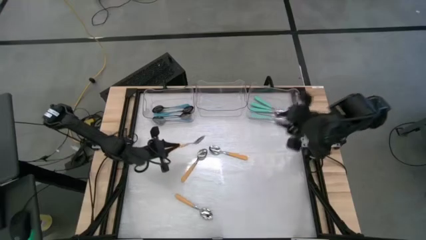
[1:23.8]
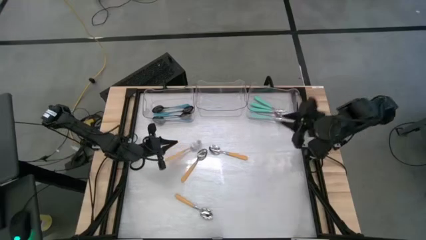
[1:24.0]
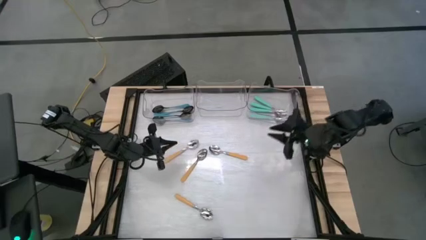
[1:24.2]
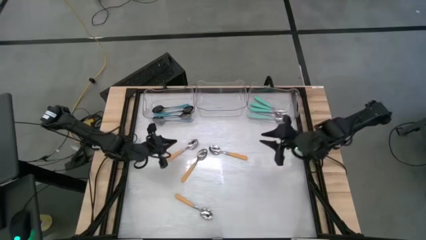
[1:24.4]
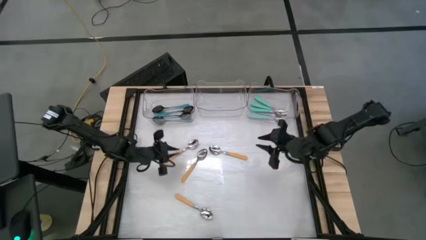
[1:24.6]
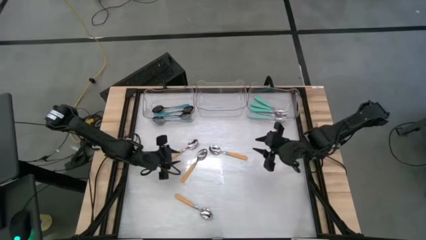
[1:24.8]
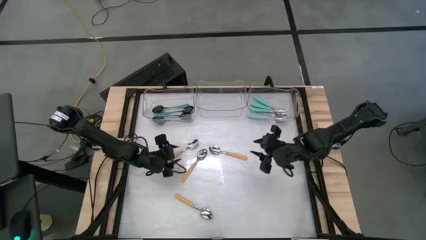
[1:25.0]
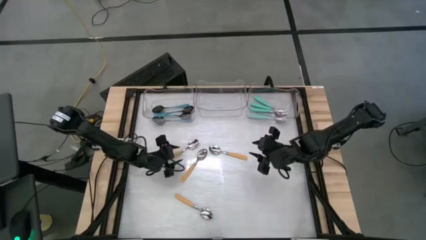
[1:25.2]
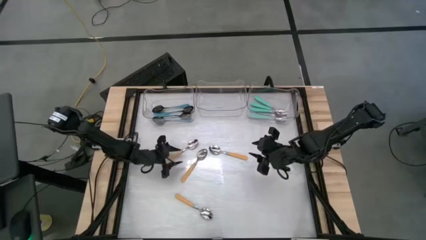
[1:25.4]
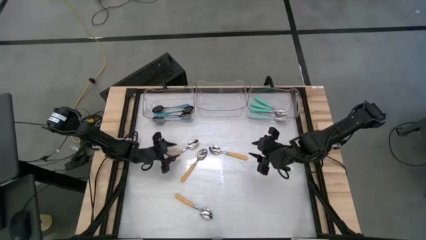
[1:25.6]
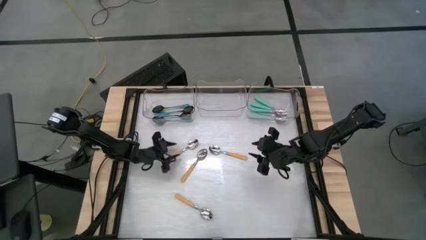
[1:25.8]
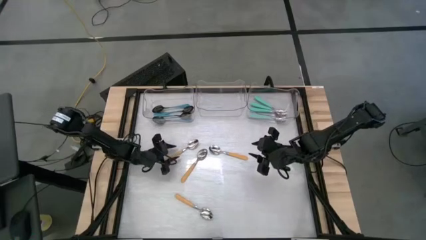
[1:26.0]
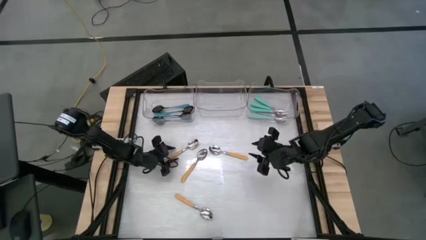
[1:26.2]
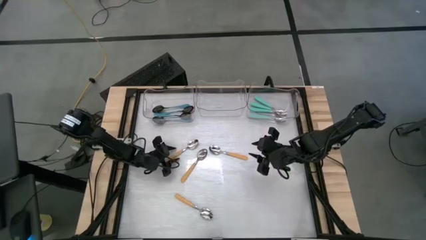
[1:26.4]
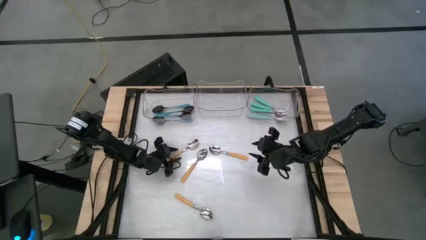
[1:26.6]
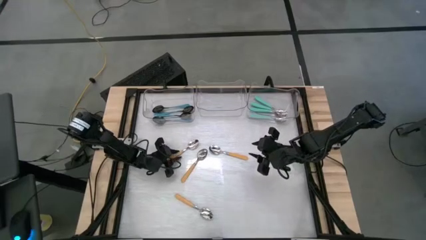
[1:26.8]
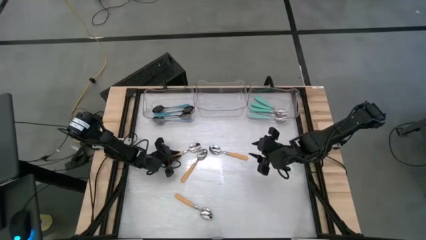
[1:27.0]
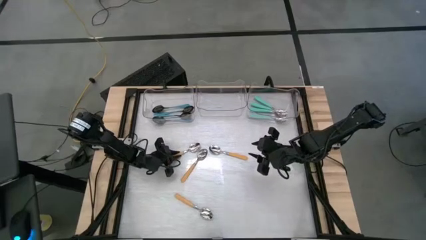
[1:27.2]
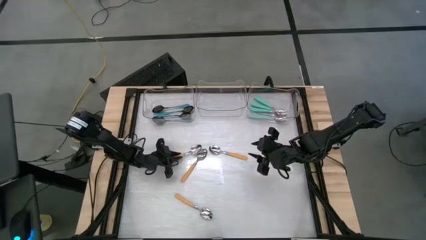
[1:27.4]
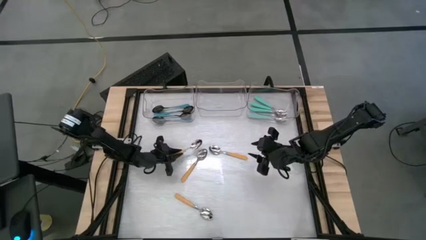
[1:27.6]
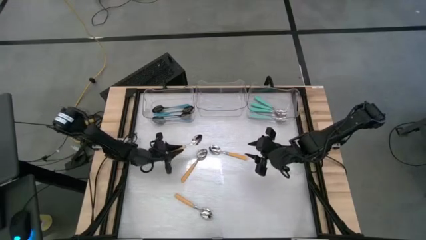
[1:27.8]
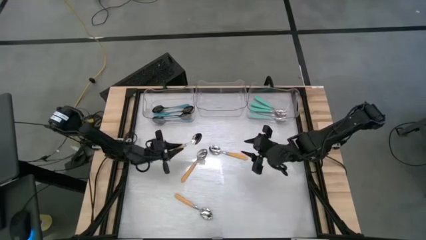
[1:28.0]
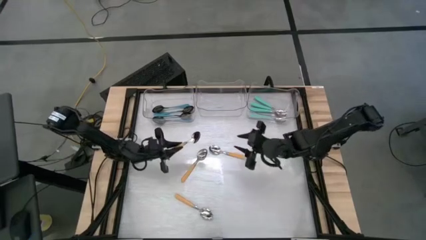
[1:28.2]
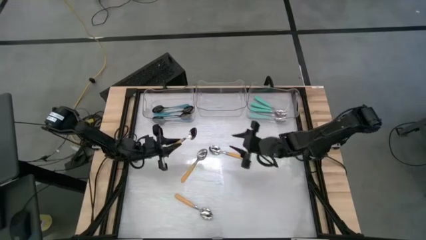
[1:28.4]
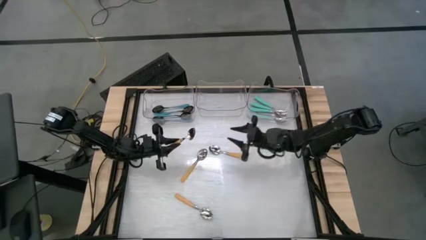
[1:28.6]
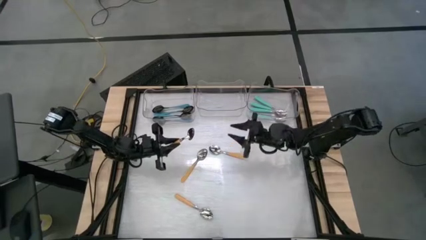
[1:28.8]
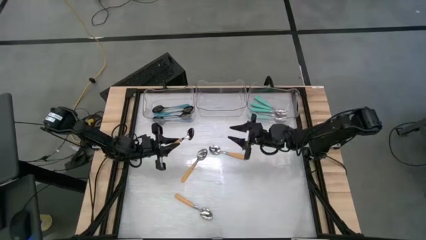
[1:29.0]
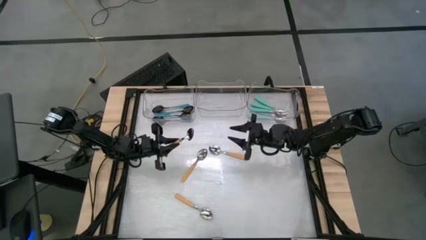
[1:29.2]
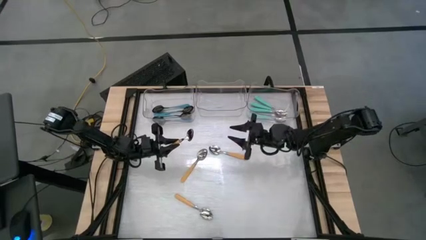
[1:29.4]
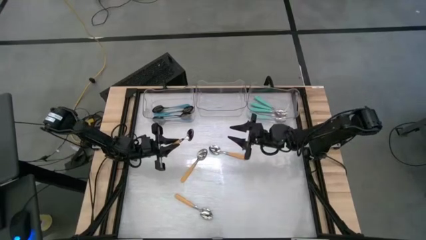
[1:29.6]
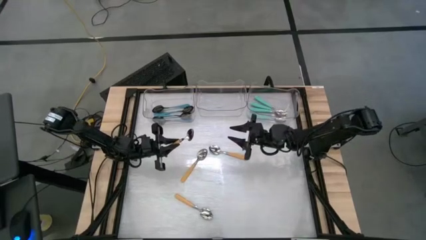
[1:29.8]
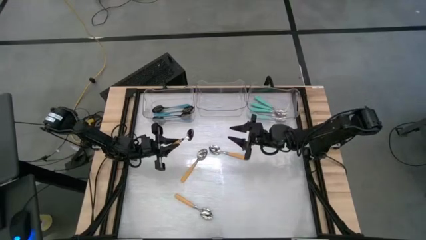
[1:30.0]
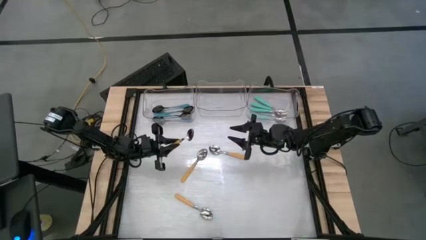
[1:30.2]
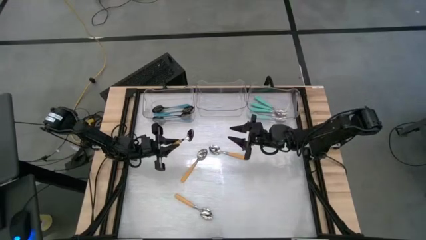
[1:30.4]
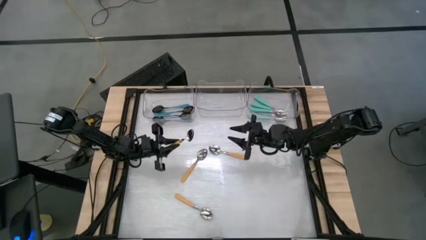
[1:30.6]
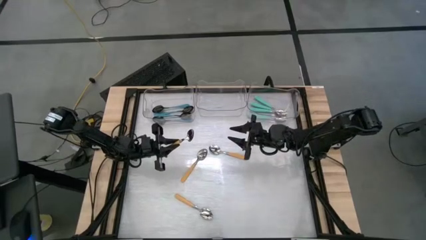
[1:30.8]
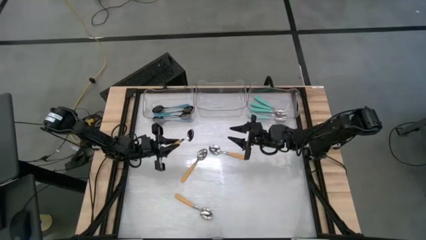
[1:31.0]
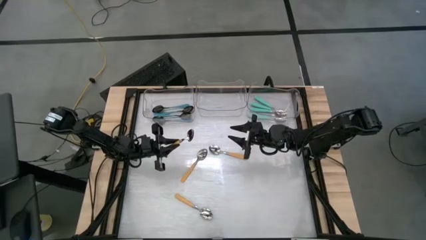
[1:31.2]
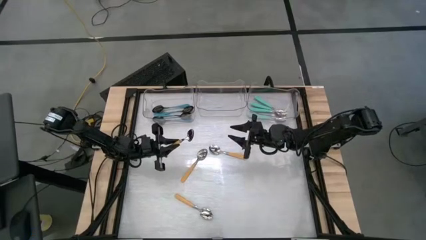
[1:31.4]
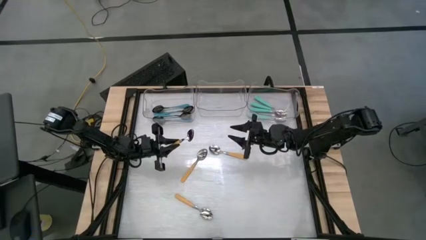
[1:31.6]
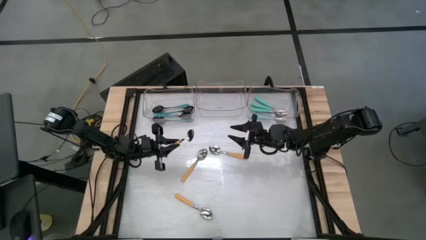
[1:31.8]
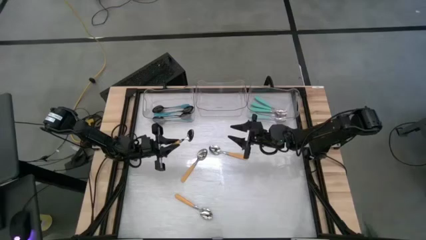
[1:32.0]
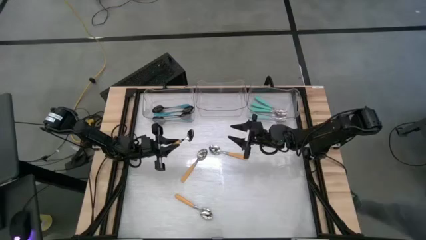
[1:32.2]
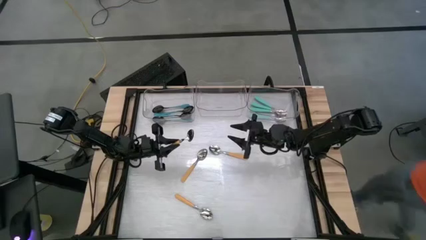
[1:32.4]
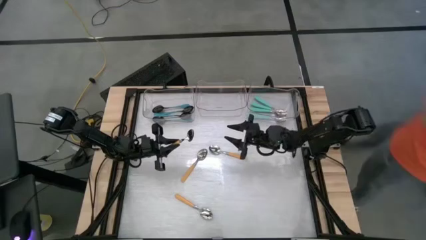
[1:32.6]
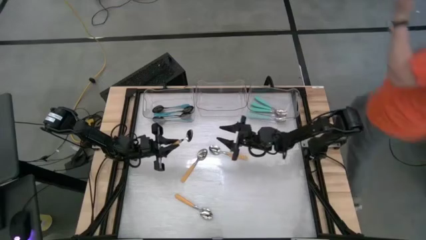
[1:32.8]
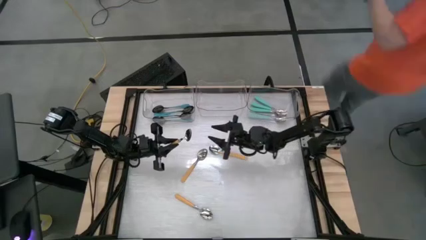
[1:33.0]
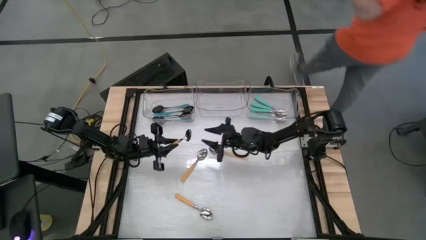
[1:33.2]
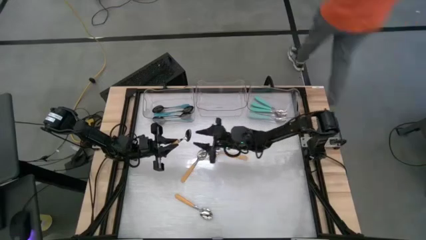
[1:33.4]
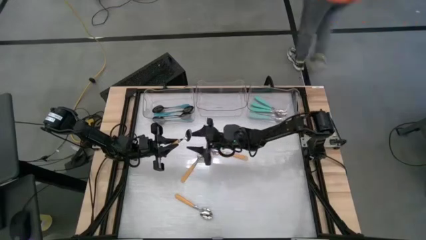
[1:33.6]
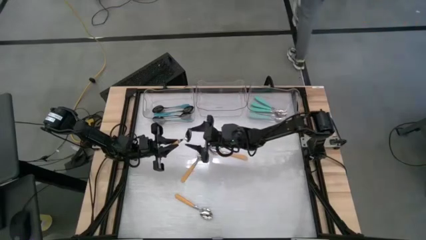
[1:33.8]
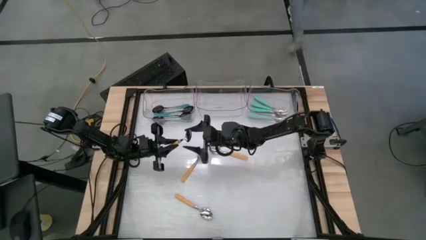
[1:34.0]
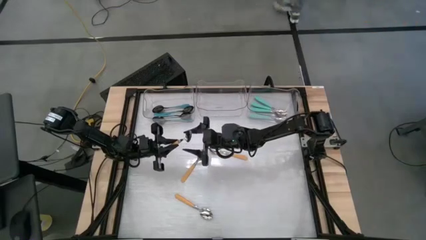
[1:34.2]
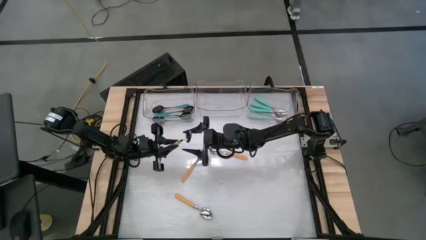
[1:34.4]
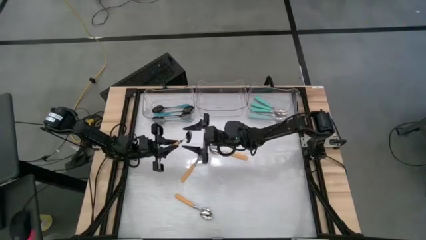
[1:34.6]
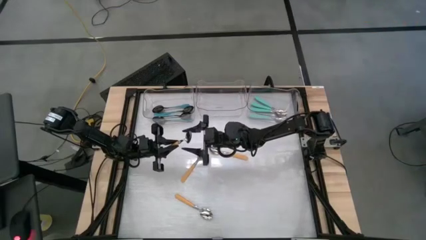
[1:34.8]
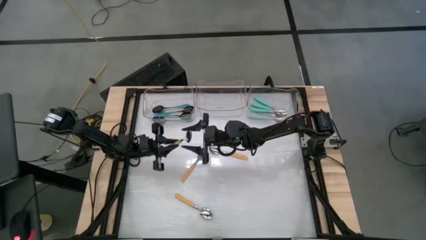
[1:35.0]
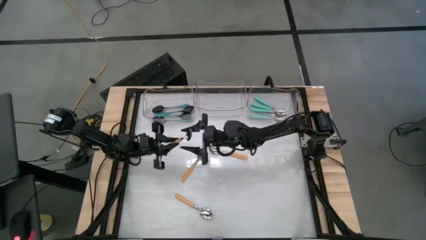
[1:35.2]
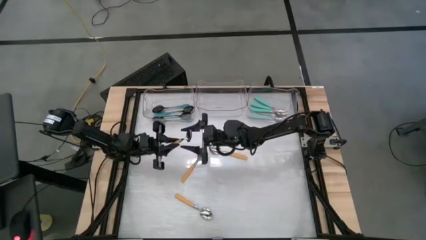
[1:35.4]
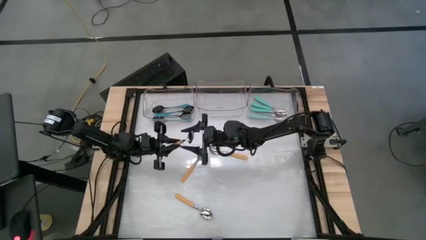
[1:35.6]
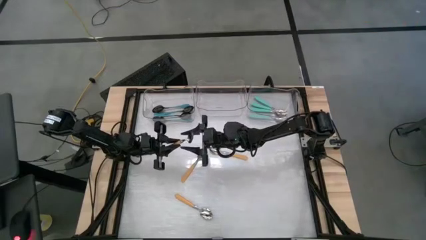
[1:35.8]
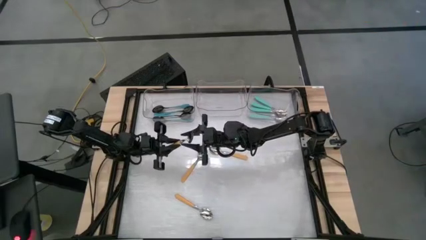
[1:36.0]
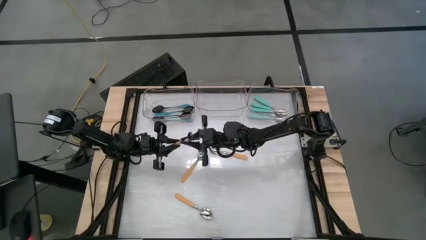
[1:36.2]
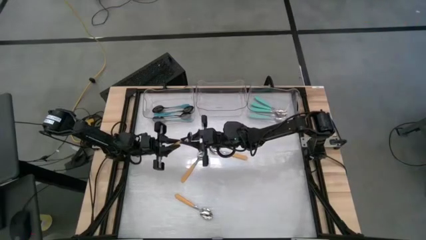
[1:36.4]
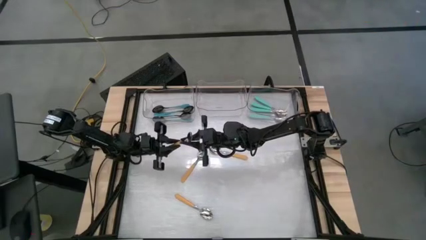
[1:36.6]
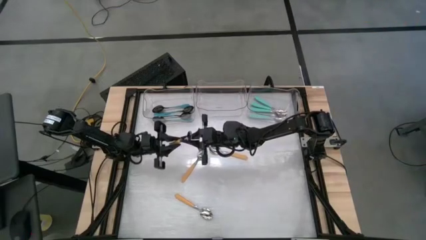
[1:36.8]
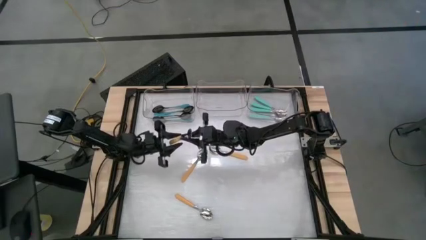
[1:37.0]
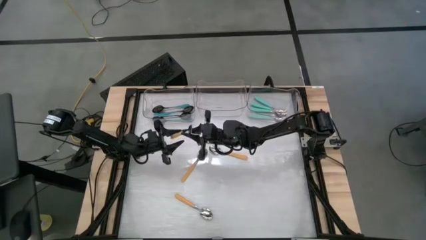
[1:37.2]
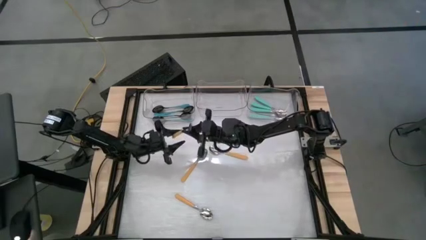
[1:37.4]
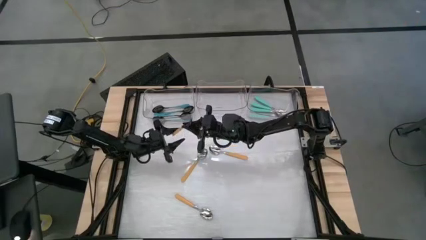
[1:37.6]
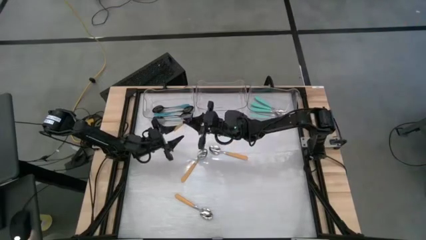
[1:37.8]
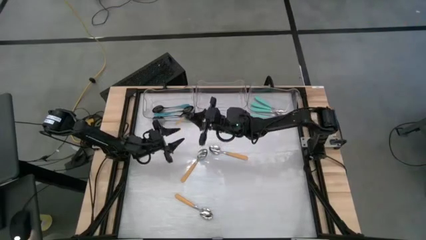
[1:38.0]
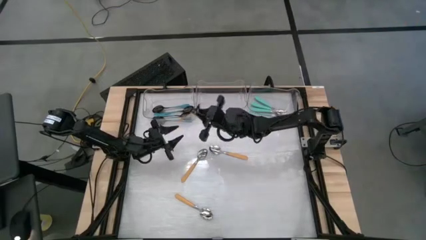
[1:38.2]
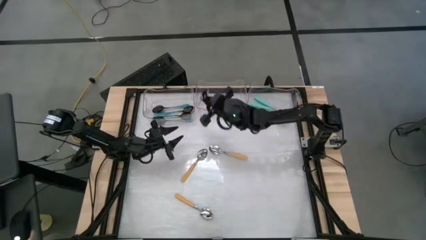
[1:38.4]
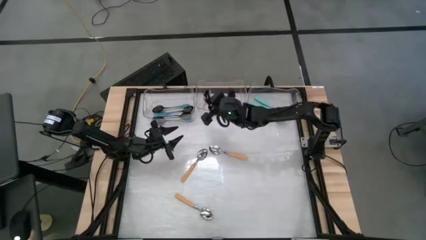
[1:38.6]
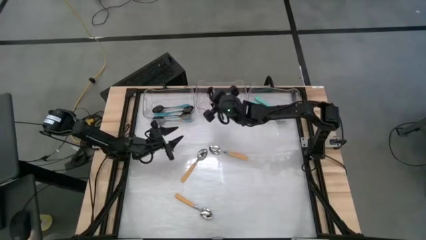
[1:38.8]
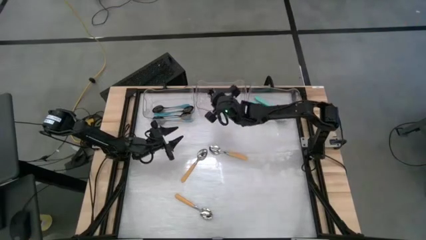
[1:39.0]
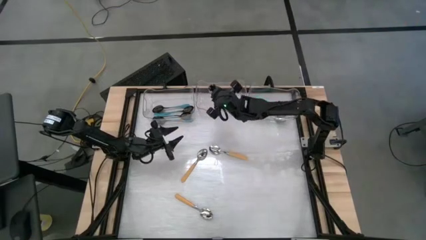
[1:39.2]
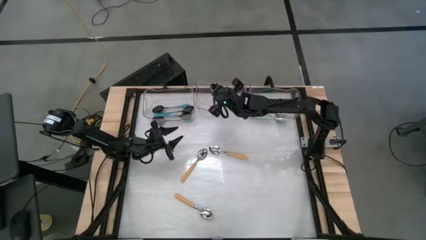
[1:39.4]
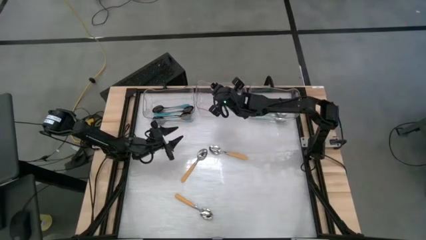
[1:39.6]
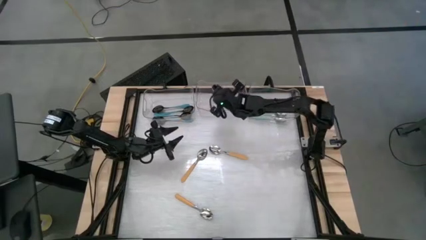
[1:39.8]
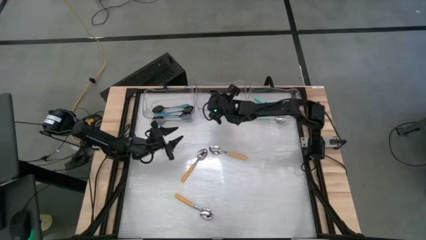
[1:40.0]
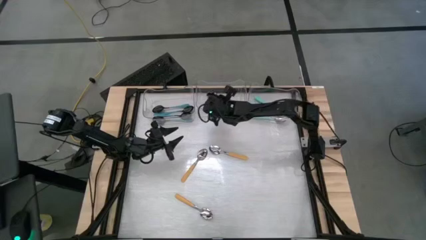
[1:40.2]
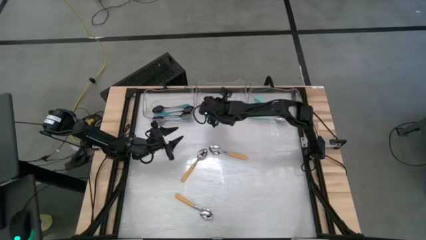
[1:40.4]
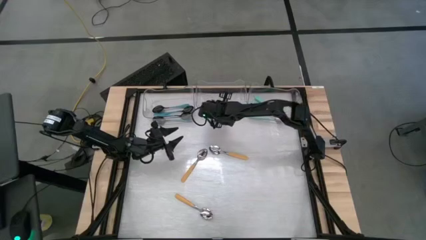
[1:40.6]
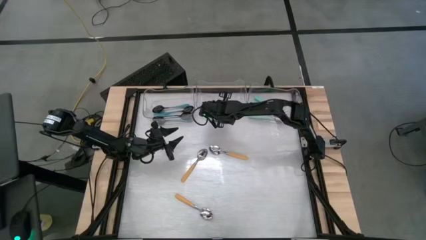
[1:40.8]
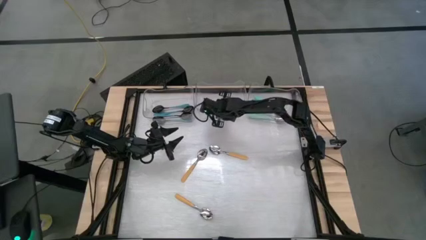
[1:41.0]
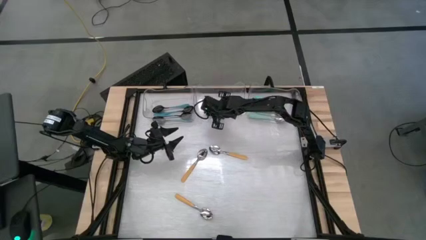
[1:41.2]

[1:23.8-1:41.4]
Task: Sort silverware by color (type)
Put the middle left yellow spoon into the top center transparent bin
